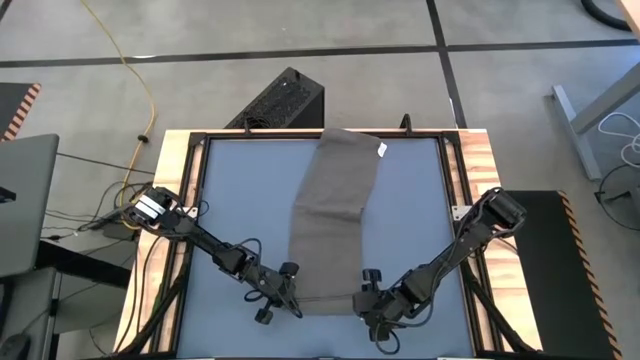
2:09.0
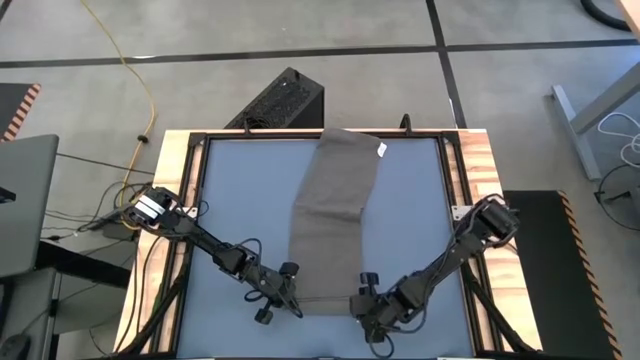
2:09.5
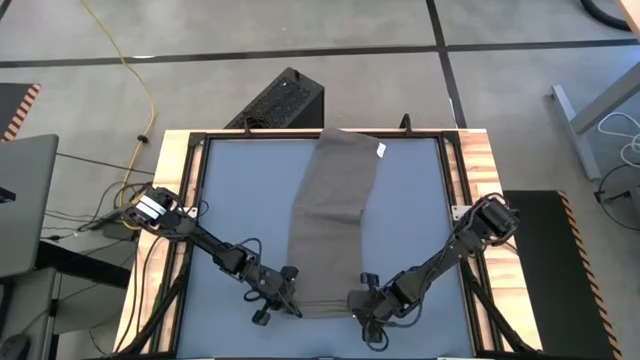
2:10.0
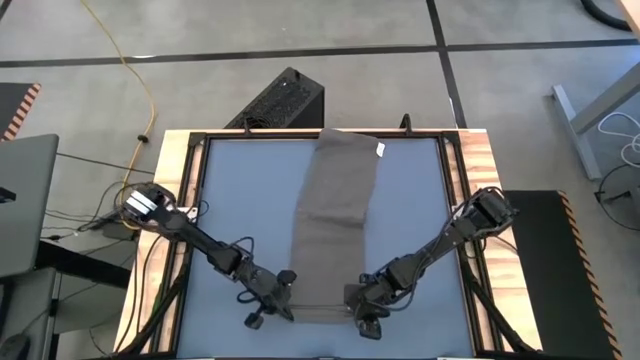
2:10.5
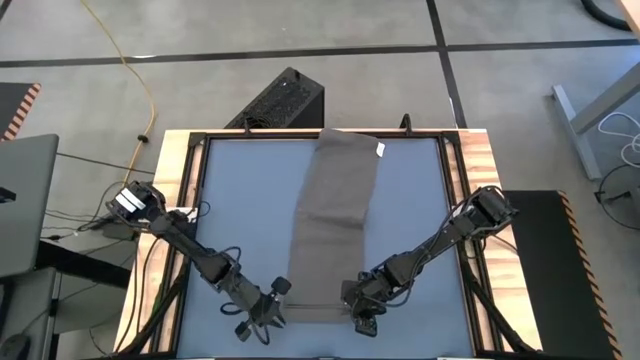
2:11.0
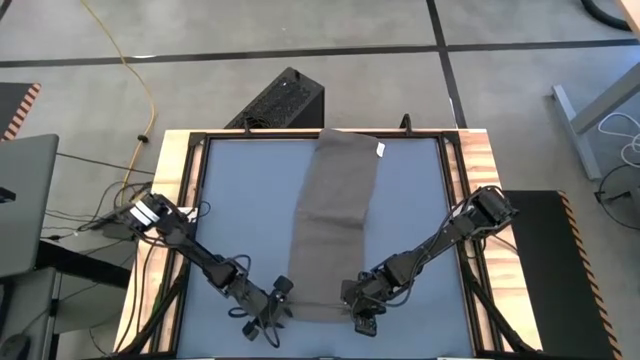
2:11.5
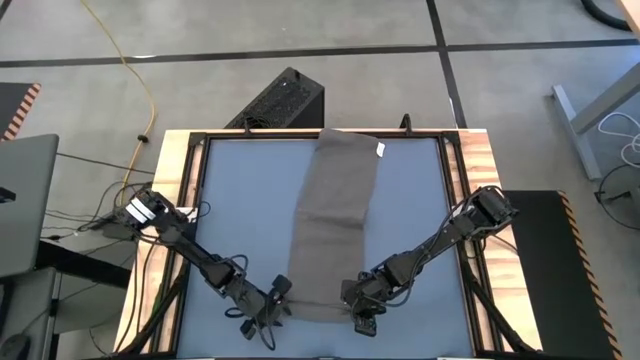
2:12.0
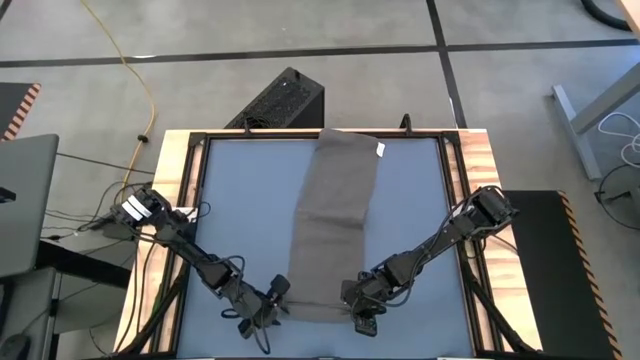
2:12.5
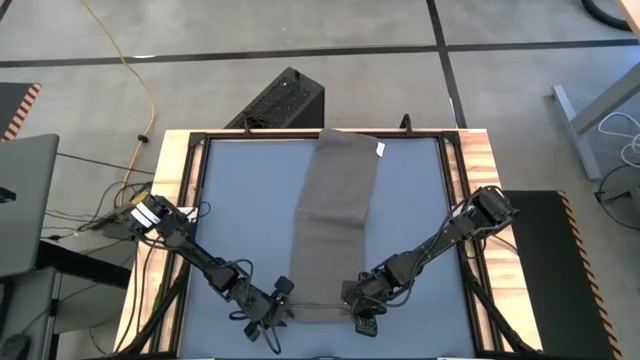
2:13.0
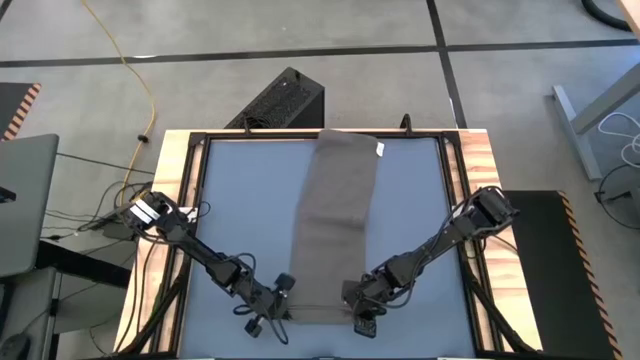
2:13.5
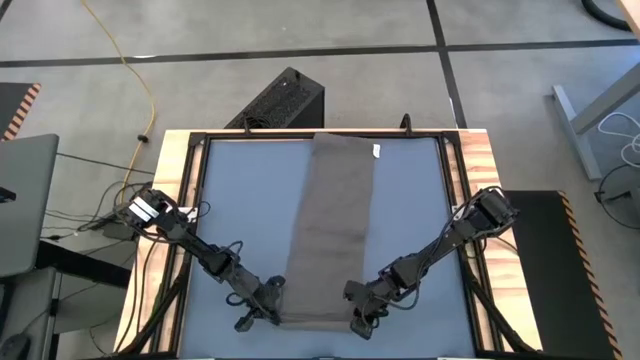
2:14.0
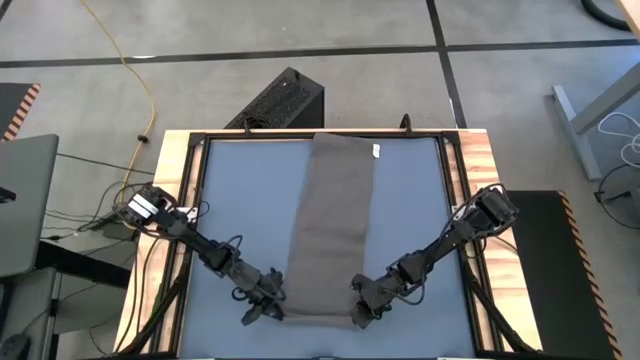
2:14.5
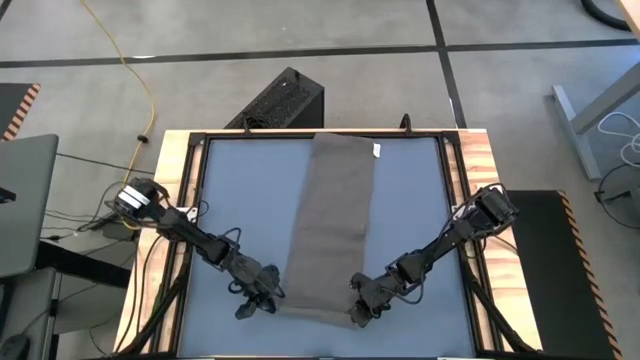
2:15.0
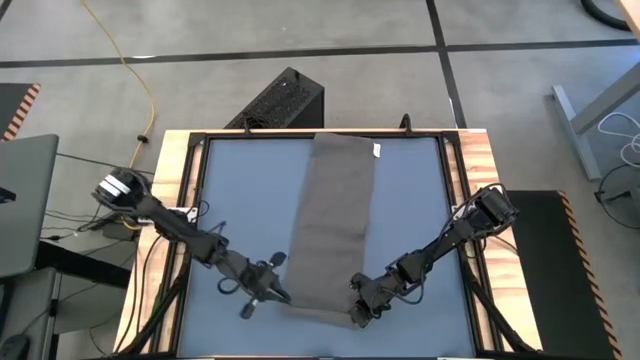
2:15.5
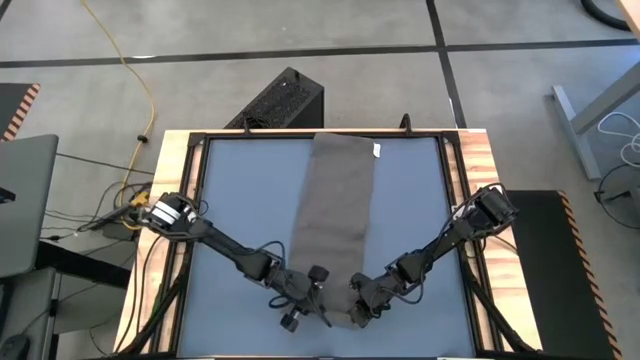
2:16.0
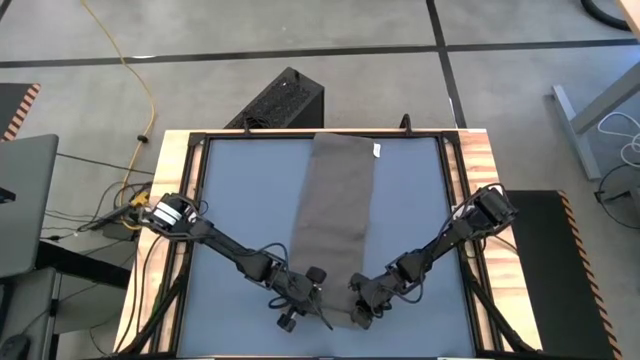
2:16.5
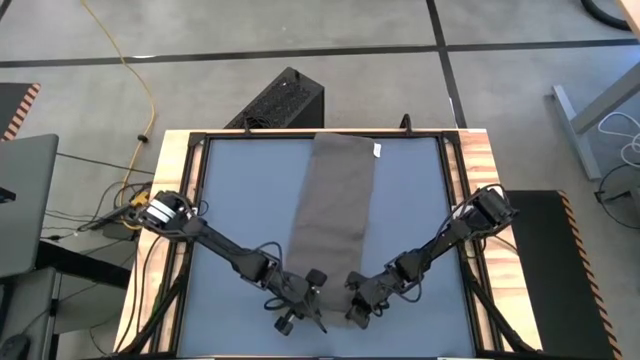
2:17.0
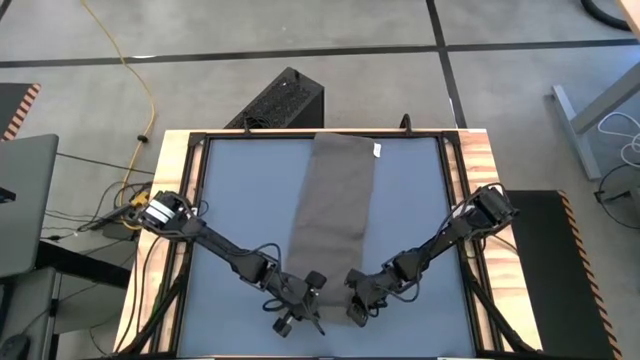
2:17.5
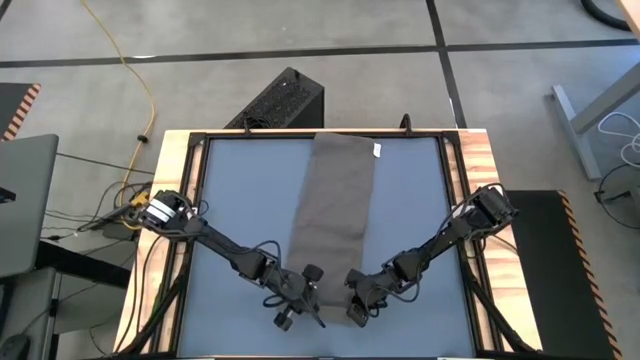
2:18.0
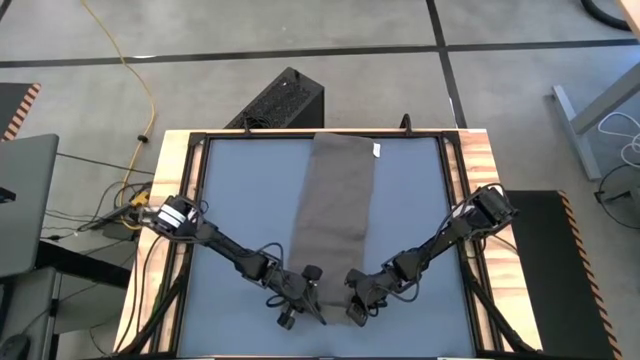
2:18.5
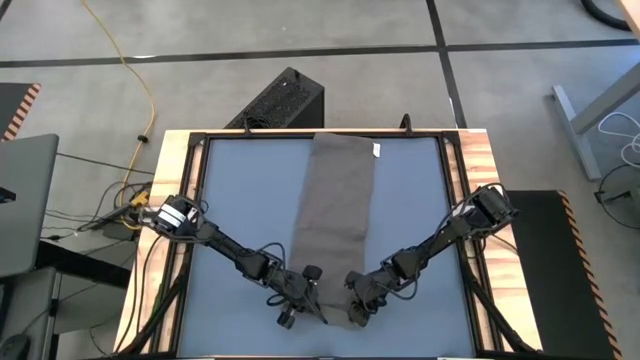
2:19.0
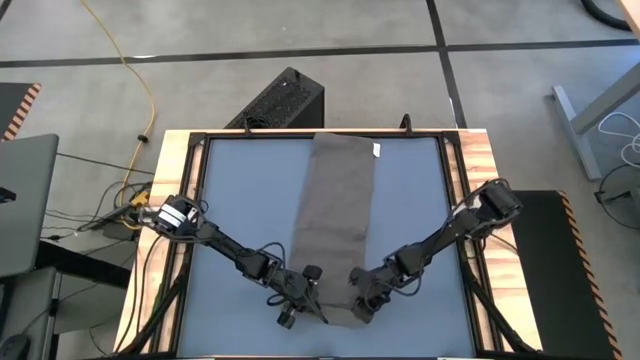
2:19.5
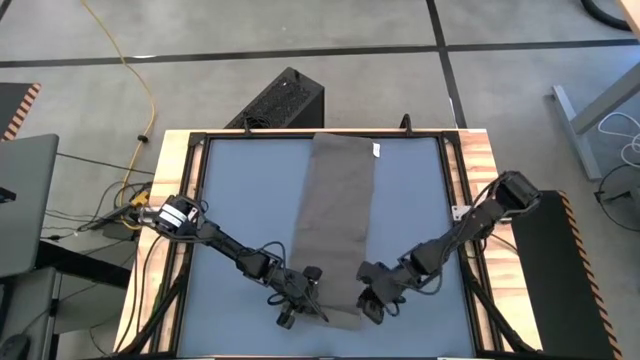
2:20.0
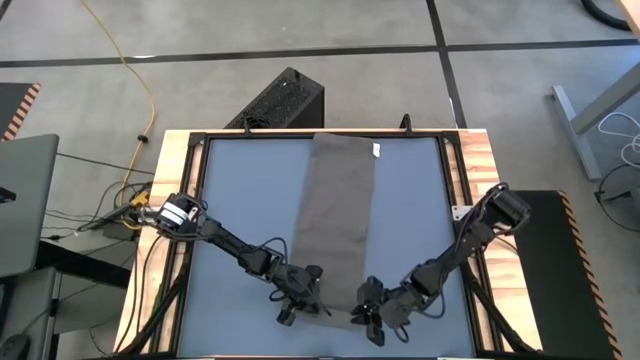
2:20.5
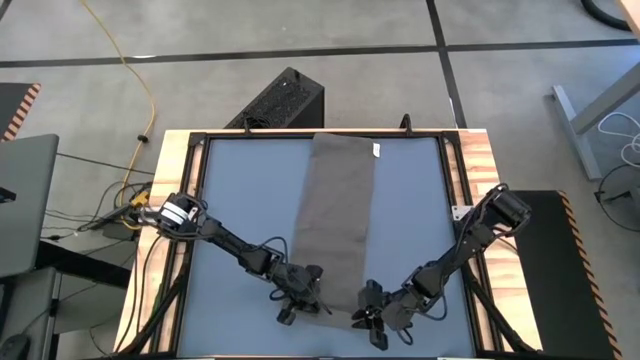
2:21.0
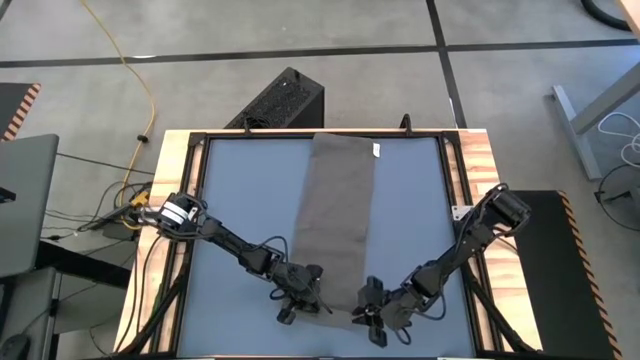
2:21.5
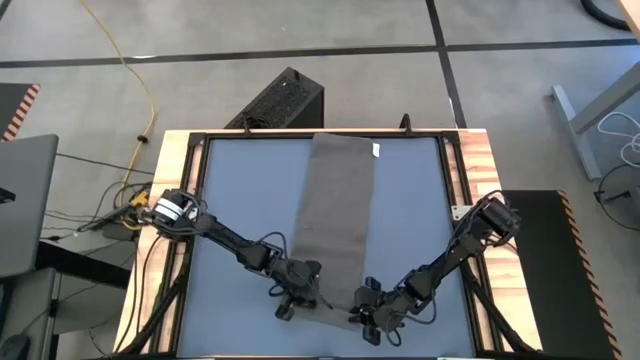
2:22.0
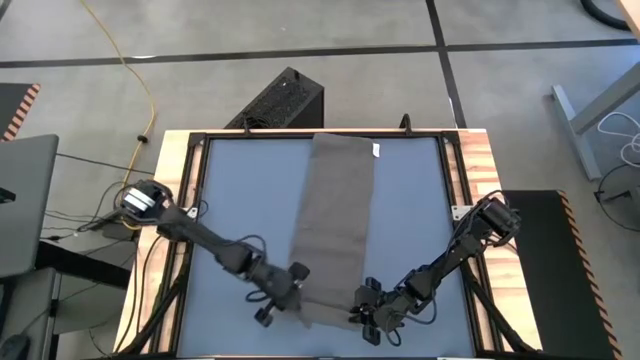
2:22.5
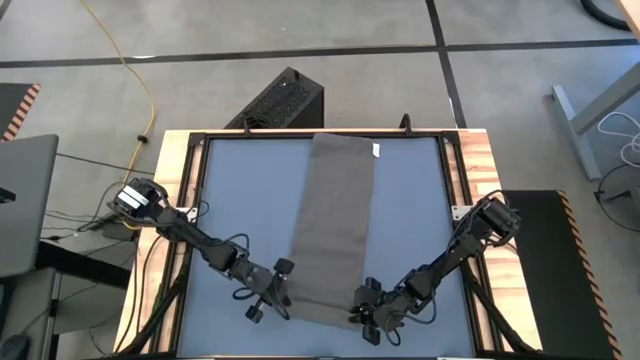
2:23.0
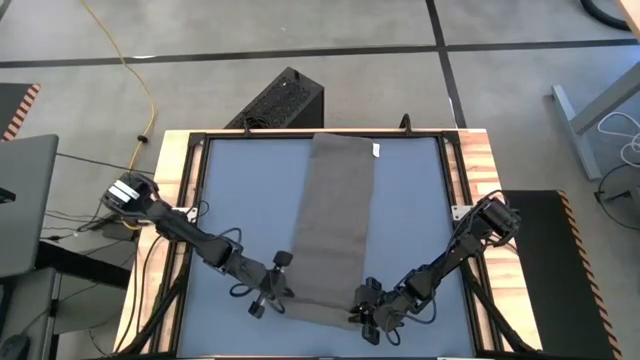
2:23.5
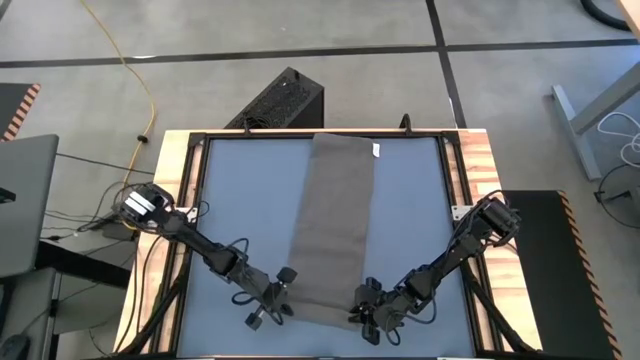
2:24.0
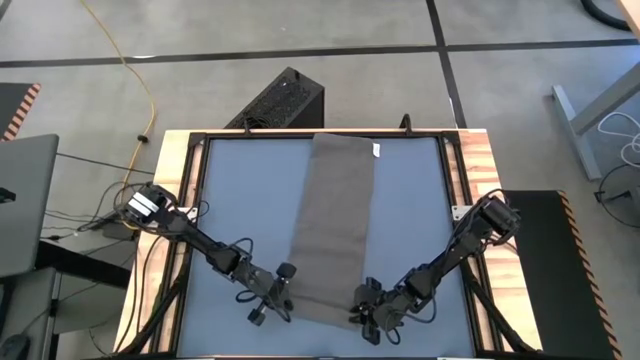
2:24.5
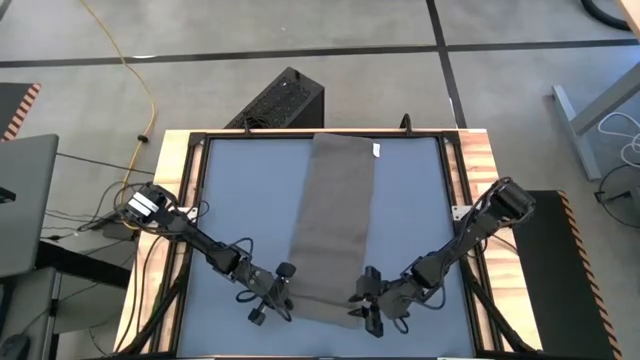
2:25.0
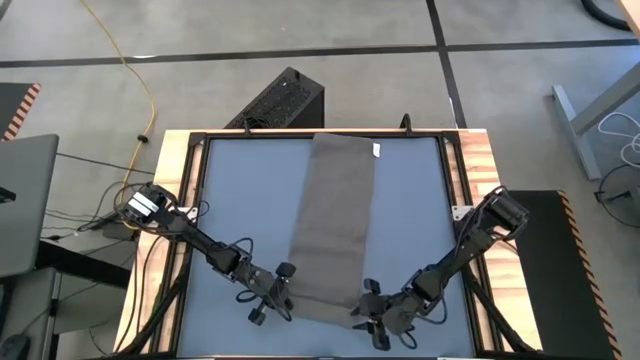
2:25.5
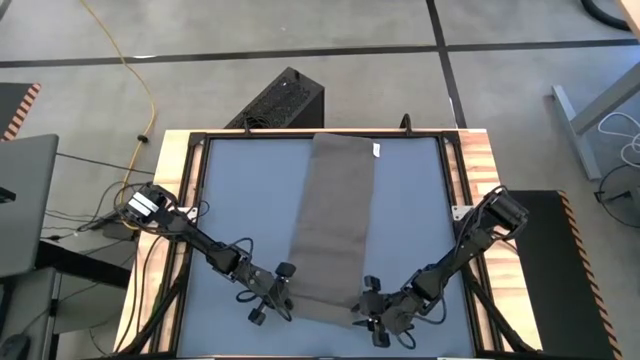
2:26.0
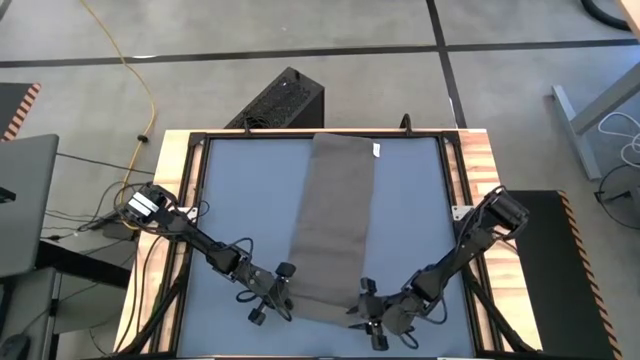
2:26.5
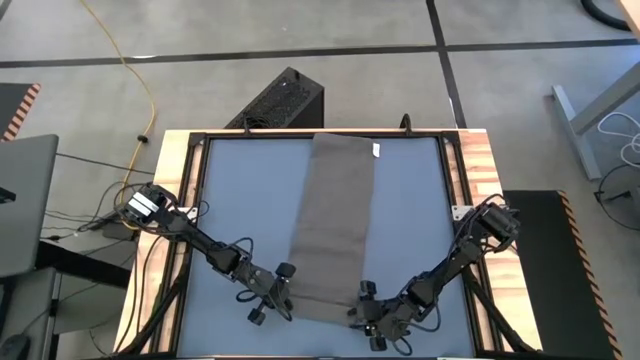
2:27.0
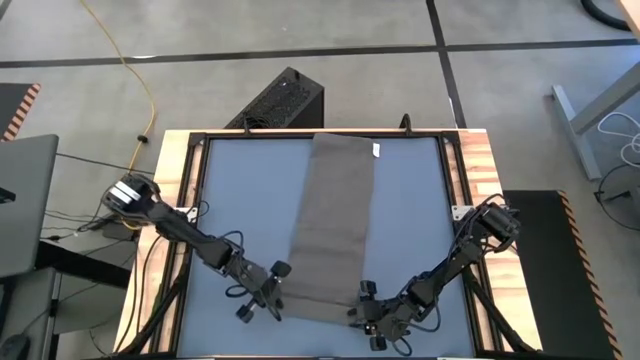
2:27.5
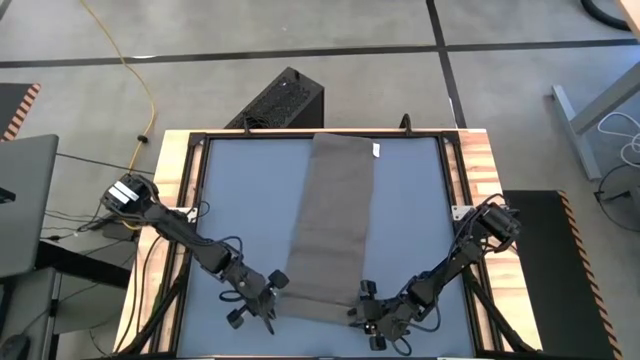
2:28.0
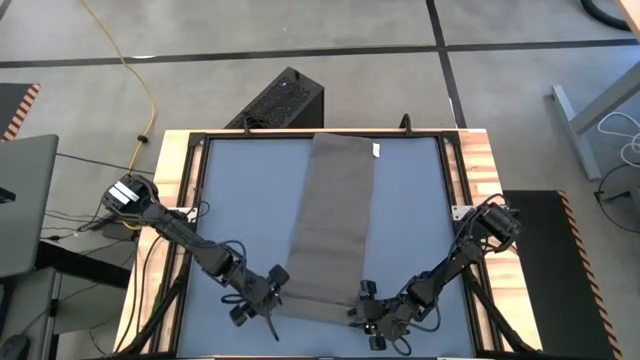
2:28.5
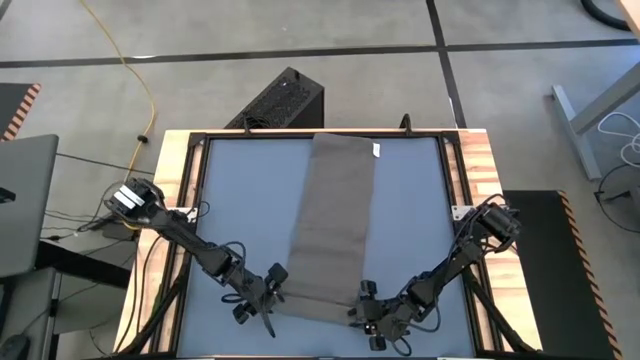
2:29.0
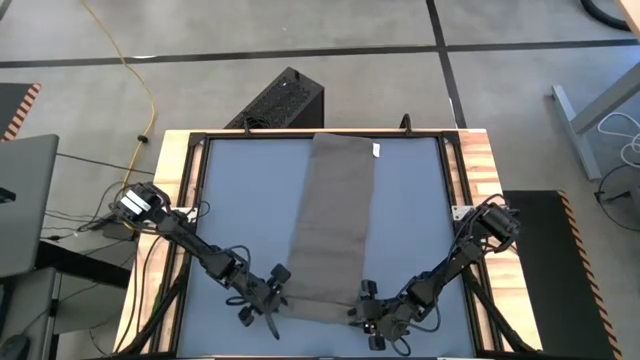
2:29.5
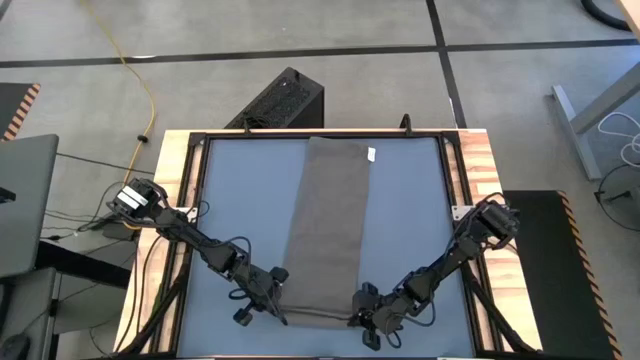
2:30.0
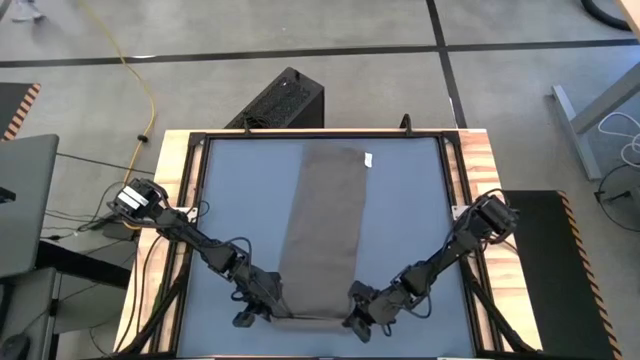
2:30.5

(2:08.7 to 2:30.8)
Task: Roll towel
Roll the gray towel
